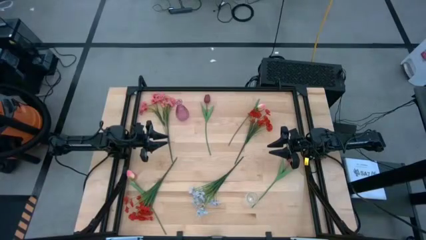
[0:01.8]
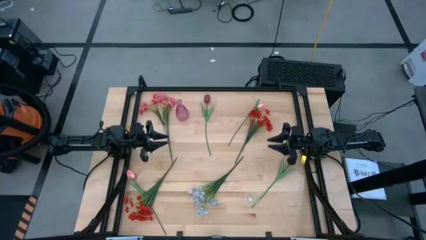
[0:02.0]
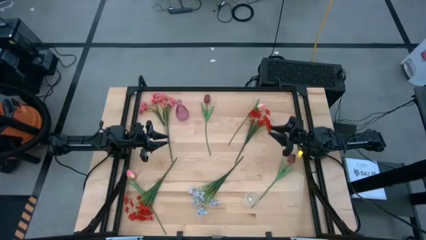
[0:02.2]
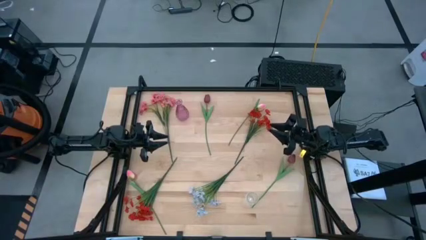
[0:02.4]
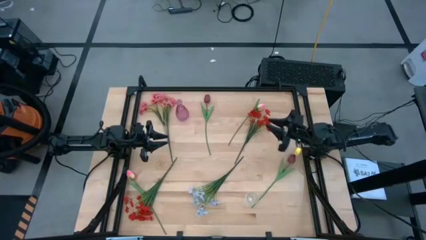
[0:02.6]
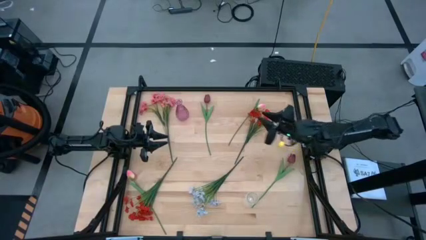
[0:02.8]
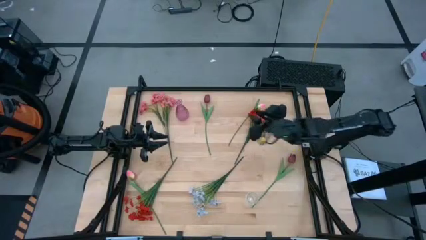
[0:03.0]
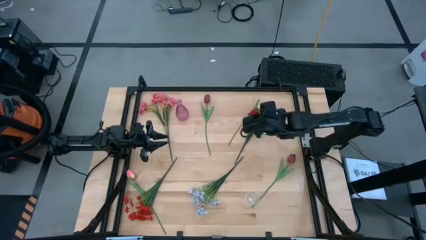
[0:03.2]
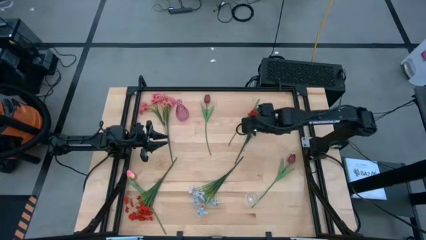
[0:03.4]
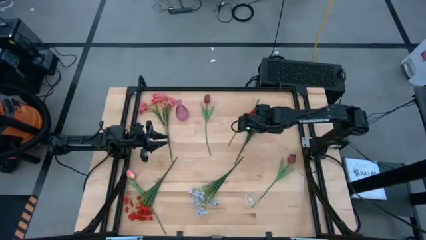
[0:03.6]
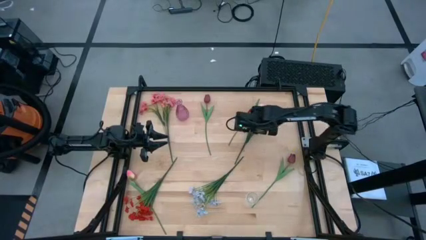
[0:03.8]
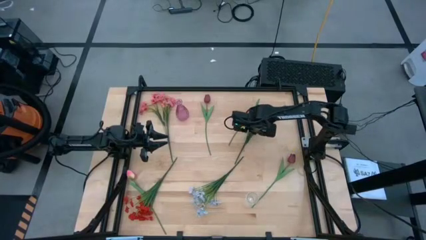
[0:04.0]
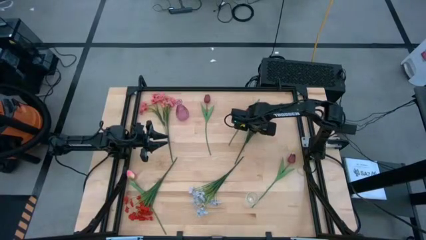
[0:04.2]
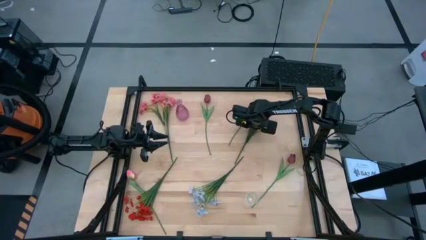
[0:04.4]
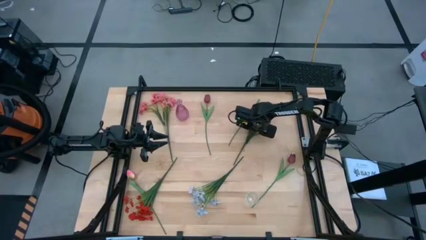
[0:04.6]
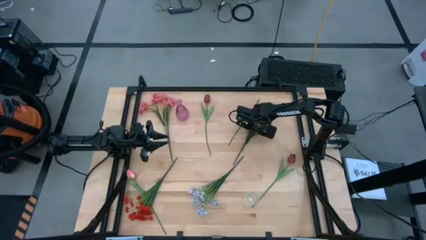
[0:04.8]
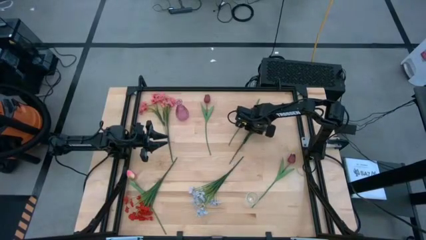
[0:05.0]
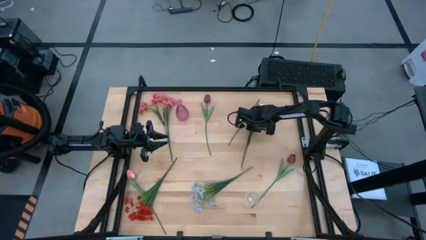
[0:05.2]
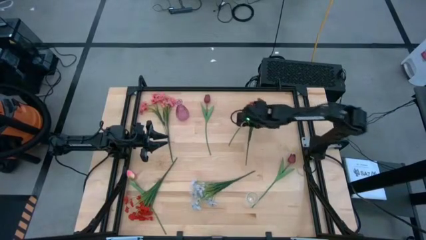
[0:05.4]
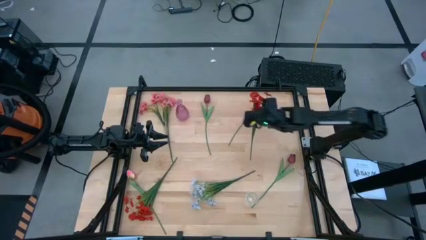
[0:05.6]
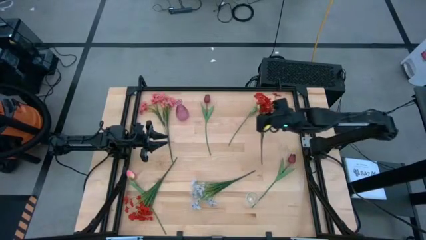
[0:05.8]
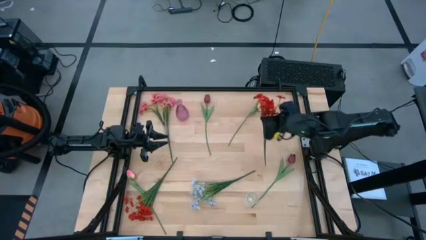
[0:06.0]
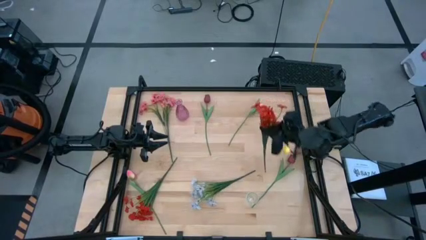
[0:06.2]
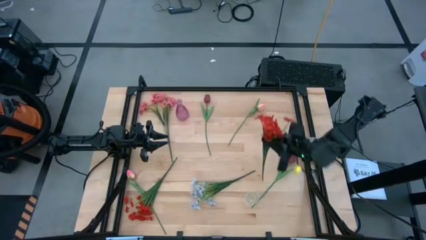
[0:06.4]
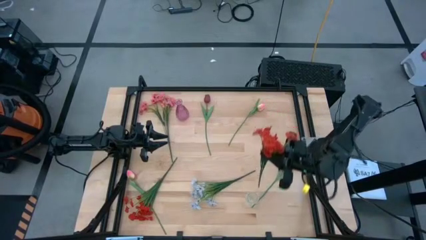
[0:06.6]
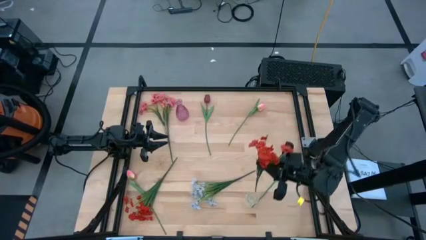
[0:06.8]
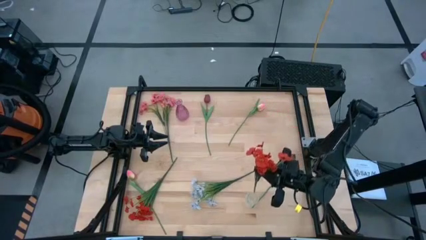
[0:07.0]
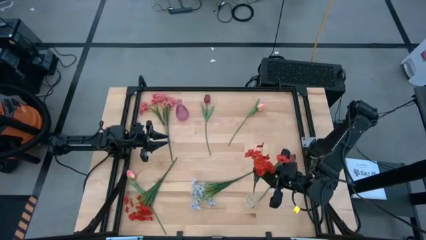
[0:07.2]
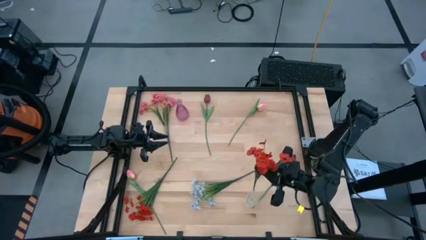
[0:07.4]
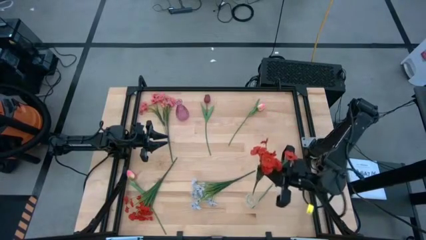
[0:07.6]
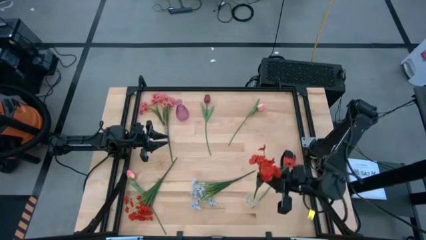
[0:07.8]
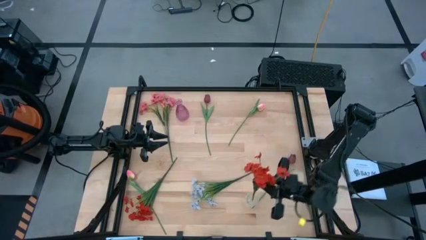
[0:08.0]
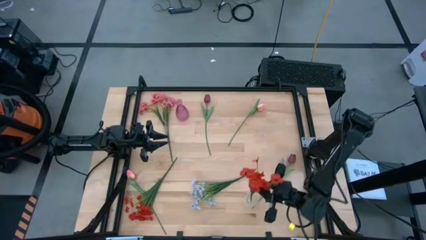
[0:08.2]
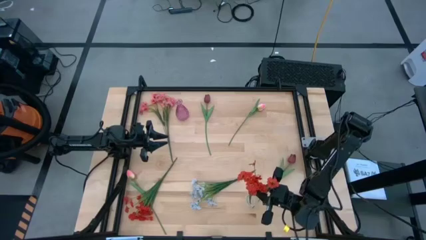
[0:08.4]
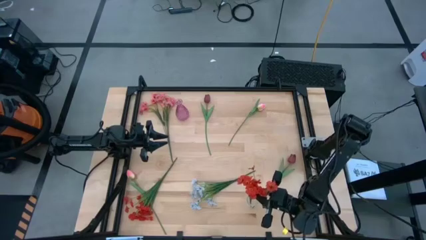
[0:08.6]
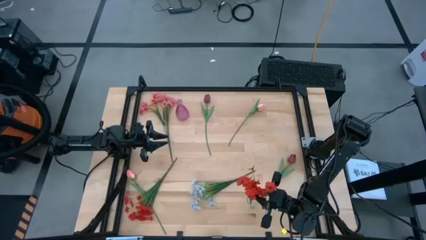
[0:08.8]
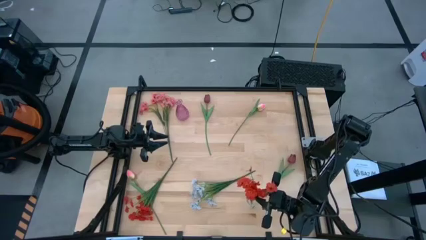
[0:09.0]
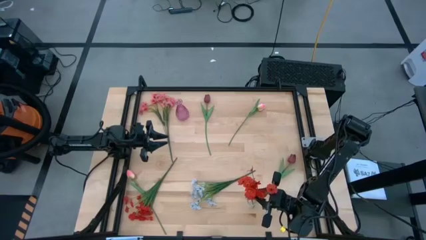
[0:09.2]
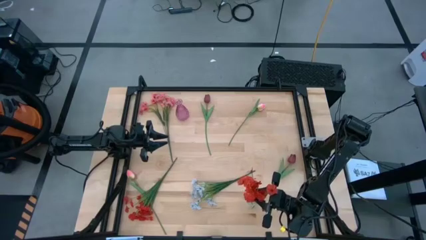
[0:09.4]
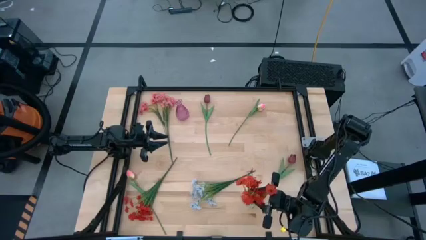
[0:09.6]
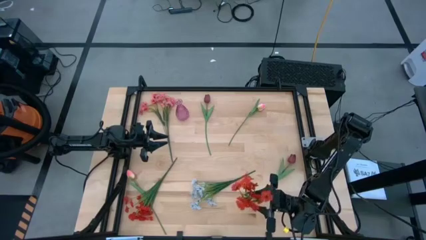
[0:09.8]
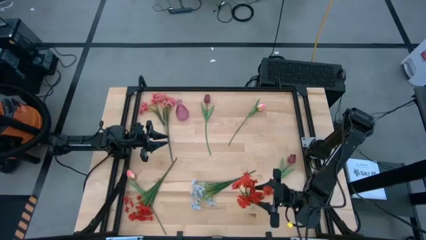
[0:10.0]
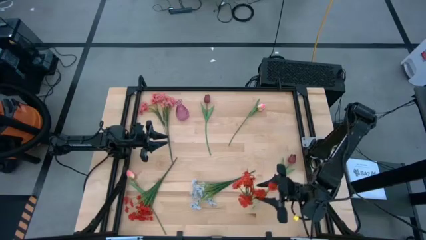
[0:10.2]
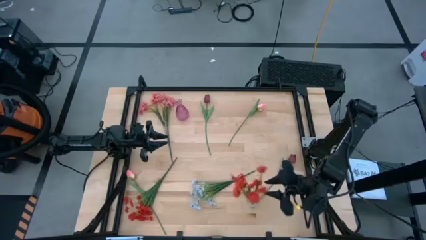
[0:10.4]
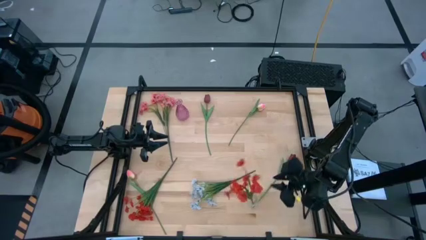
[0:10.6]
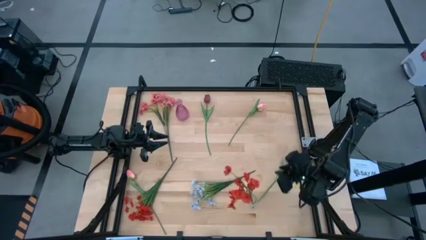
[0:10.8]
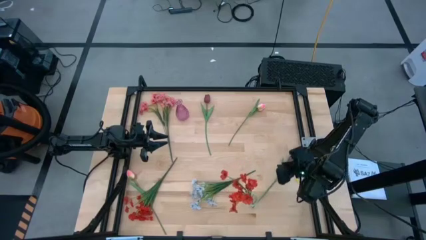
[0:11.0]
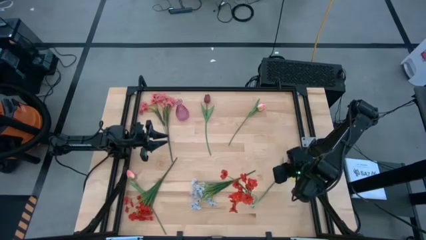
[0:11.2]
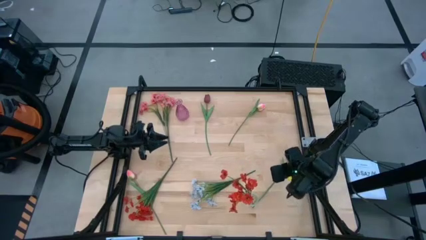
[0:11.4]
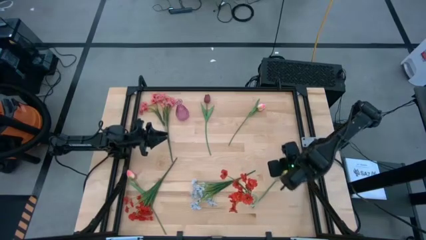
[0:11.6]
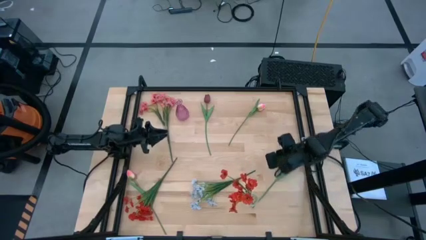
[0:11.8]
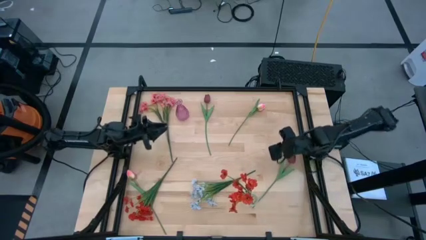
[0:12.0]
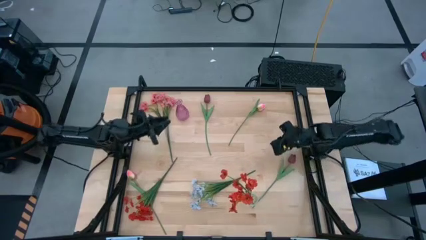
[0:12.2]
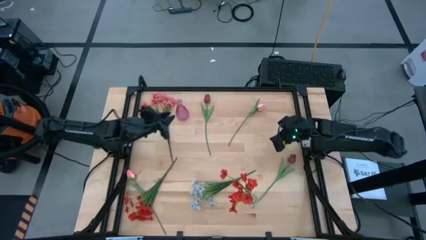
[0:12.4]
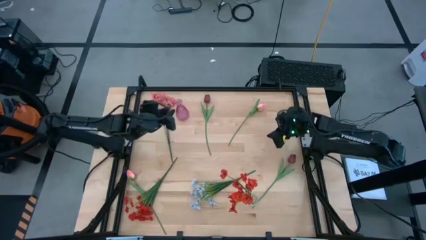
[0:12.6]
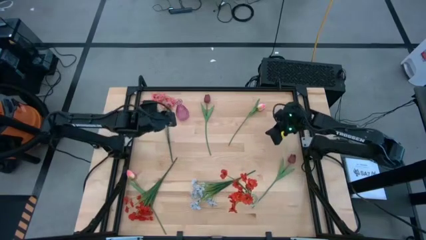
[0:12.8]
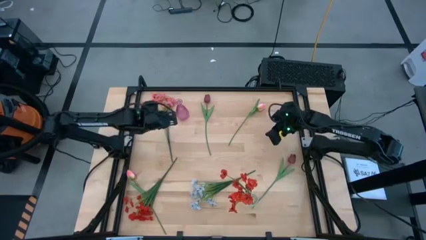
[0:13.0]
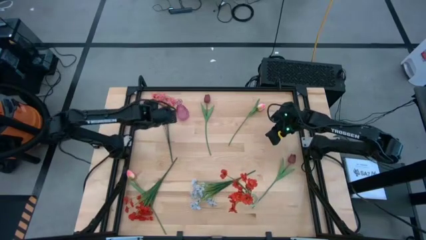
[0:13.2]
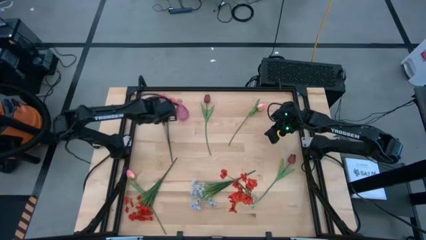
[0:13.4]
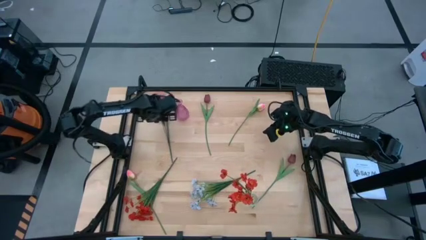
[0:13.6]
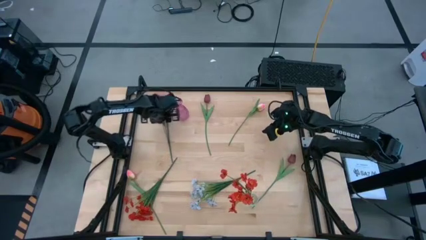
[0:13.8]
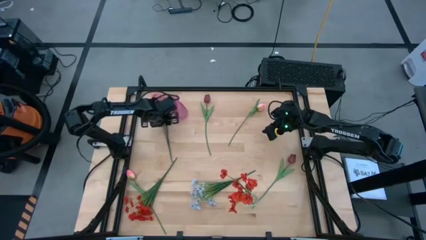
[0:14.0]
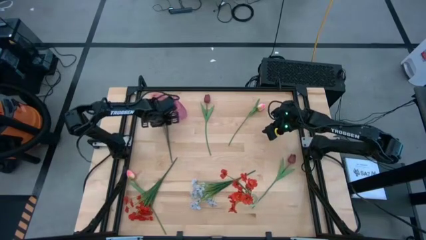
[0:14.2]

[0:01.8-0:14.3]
Task: Sort flowers into vase by color
Put the right red flowers into the transparent vase
